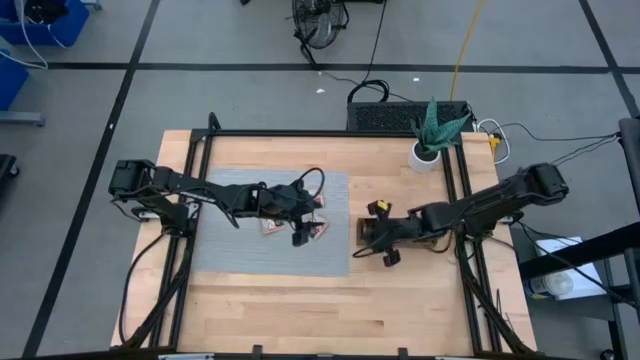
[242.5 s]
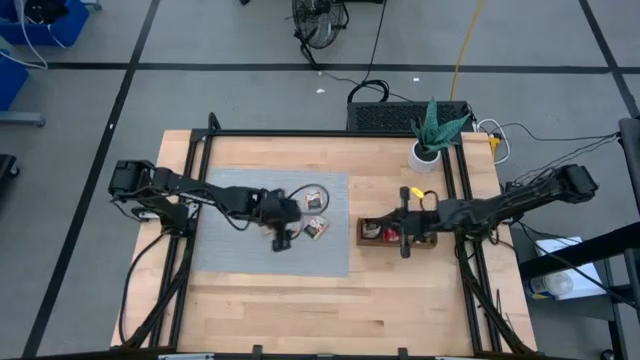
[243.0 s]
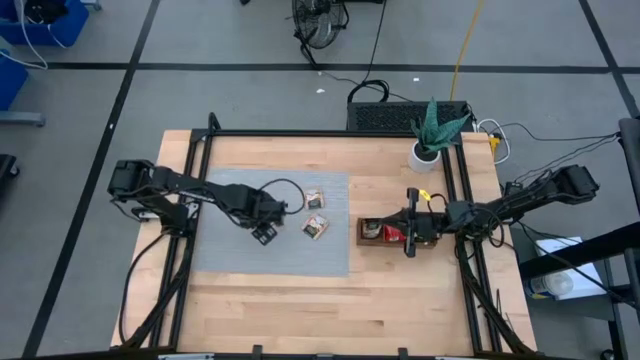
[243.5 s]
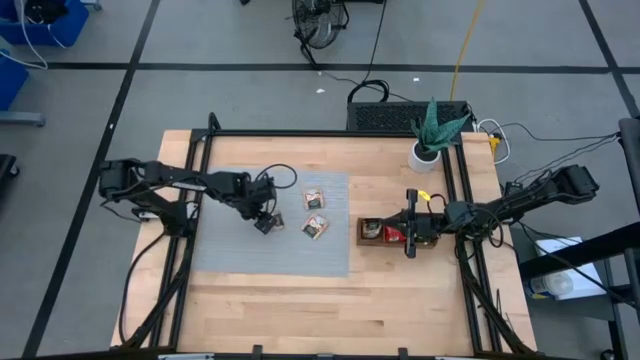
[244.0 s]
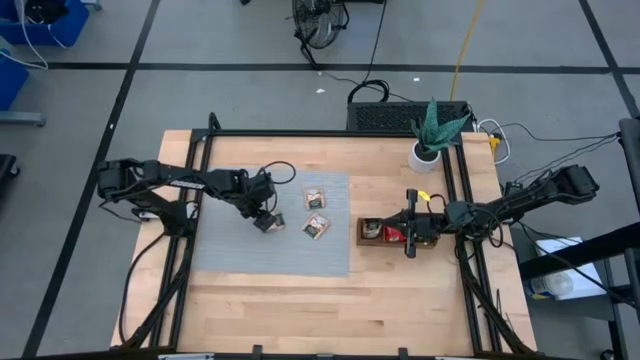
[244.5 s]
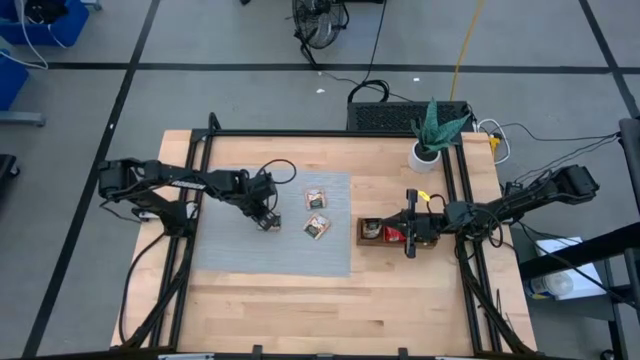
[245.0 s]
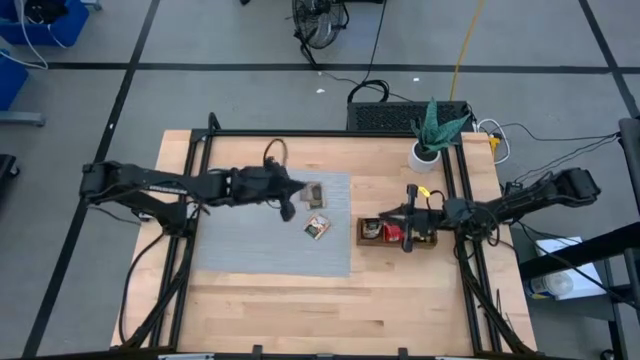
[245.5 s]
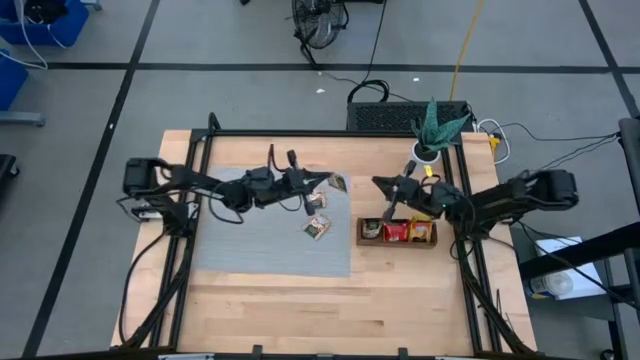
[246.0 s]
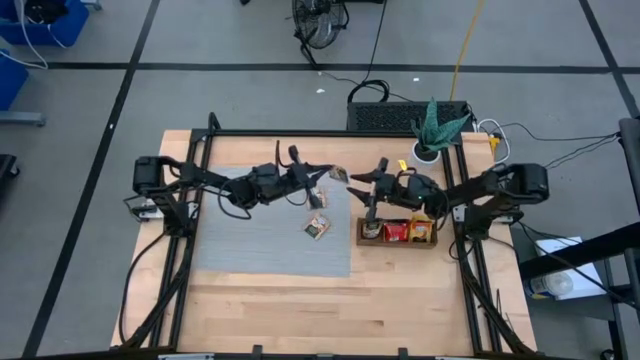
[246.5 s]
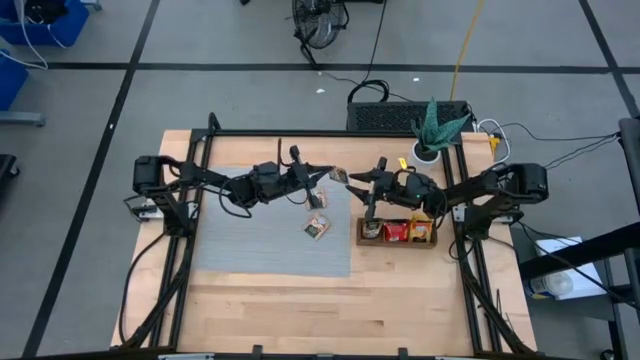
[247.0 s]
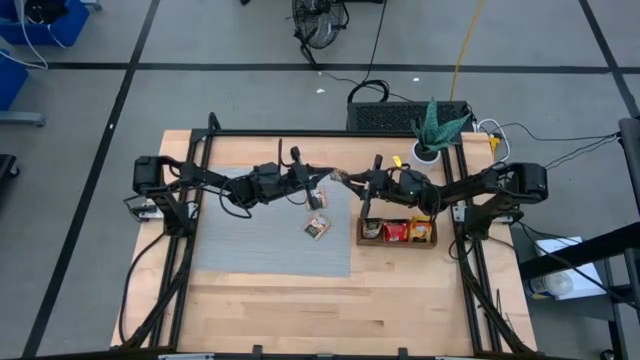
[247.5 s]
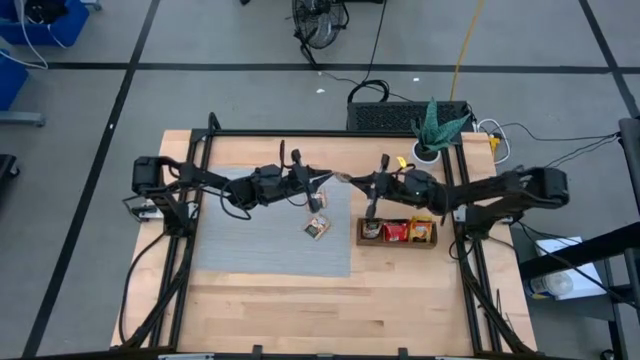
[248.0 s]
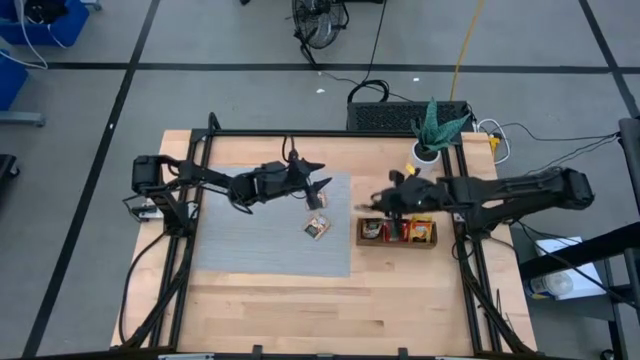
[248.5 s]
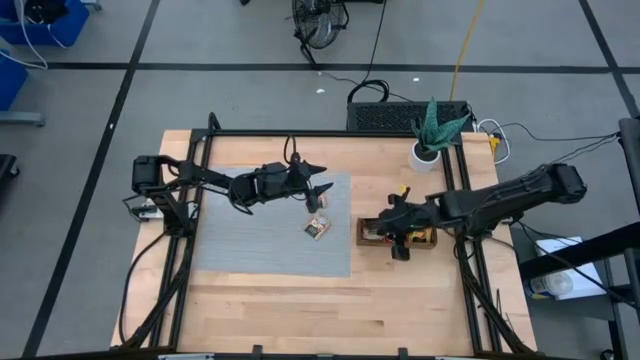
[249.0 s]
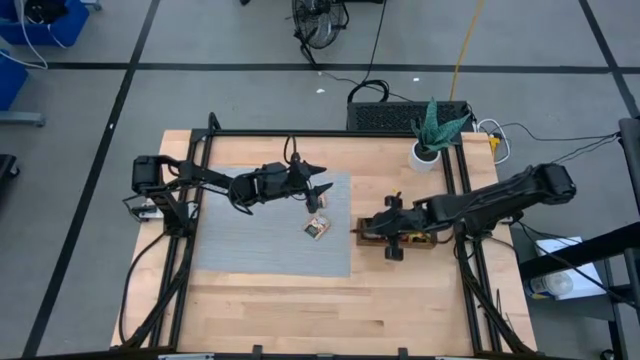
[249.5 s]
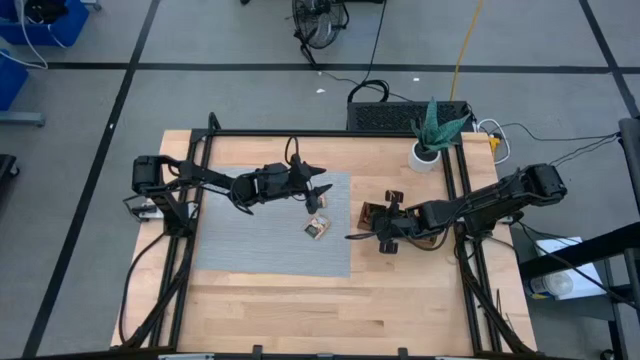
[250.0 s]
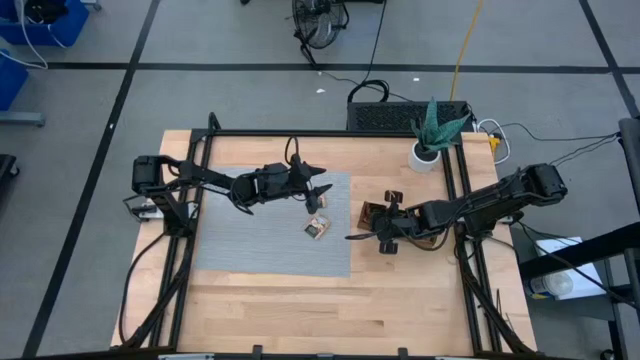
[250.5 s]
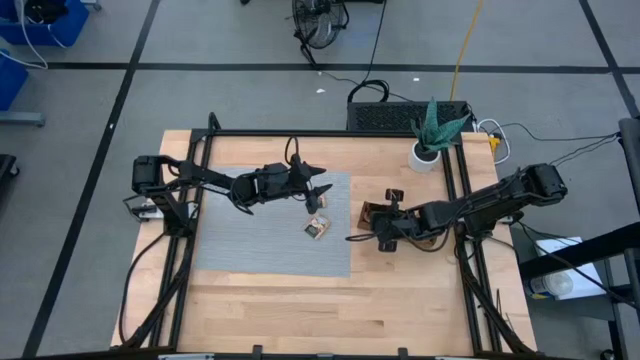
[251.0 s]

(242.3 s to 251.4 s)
Task: Pick & Place Tea
Put the brown tea bag into the left section of the wooden organizer

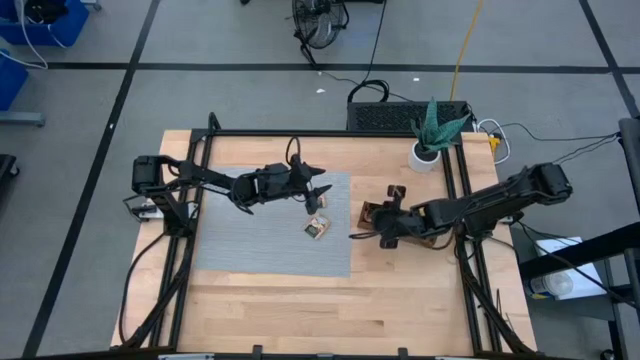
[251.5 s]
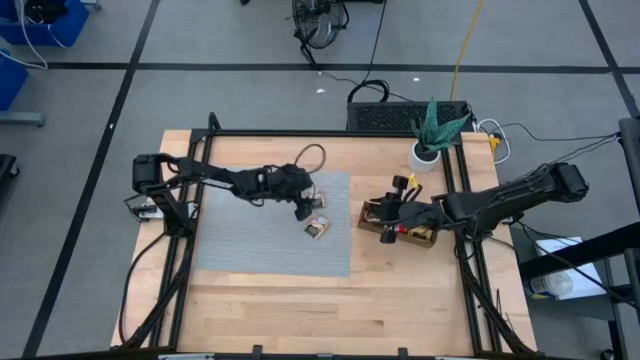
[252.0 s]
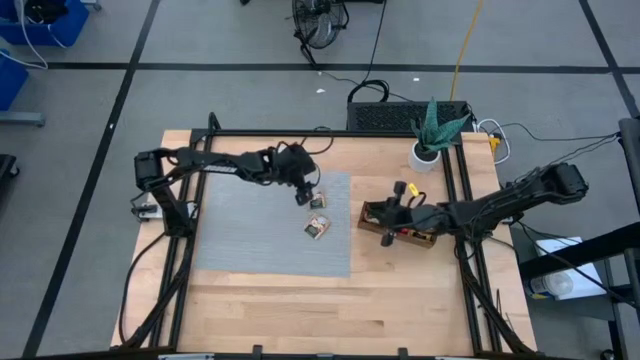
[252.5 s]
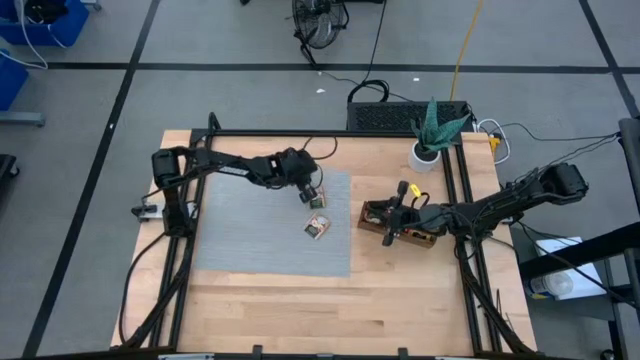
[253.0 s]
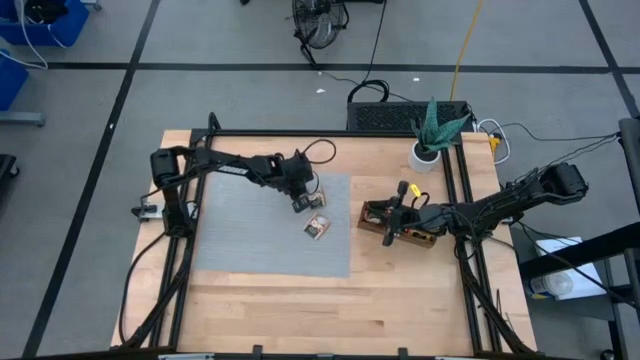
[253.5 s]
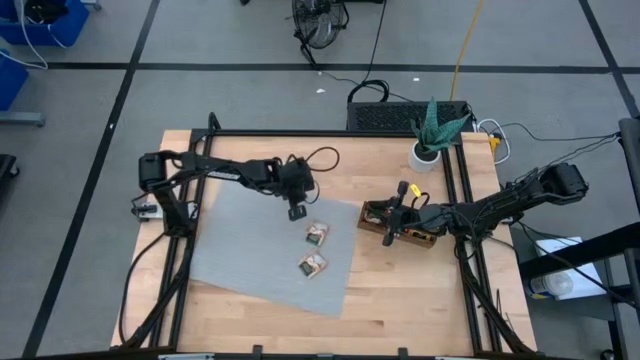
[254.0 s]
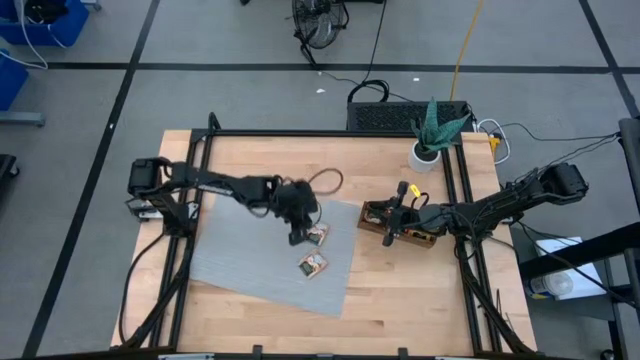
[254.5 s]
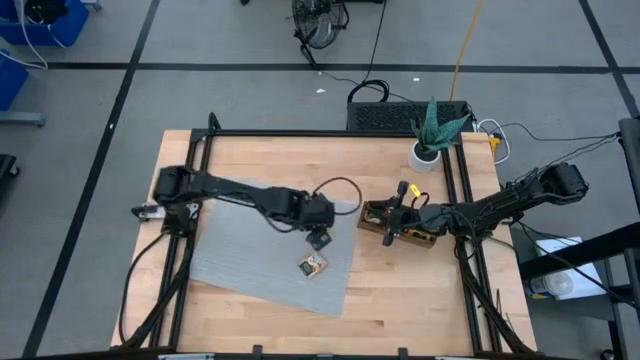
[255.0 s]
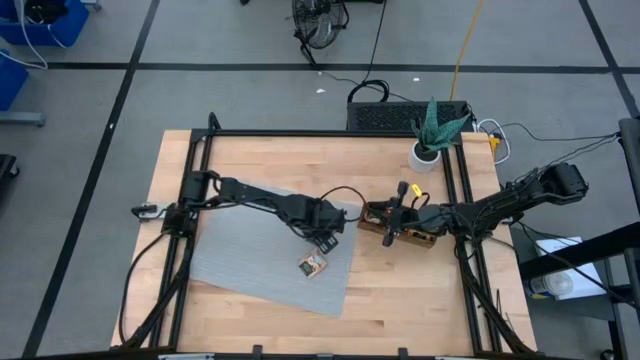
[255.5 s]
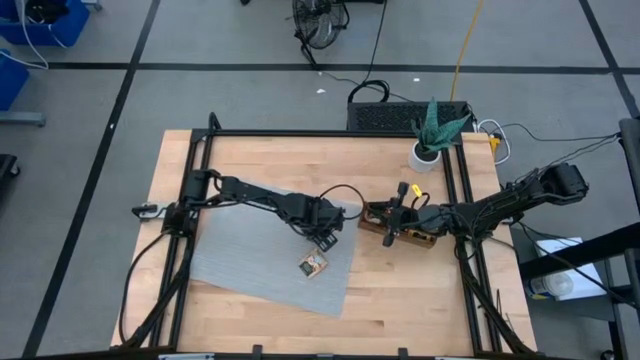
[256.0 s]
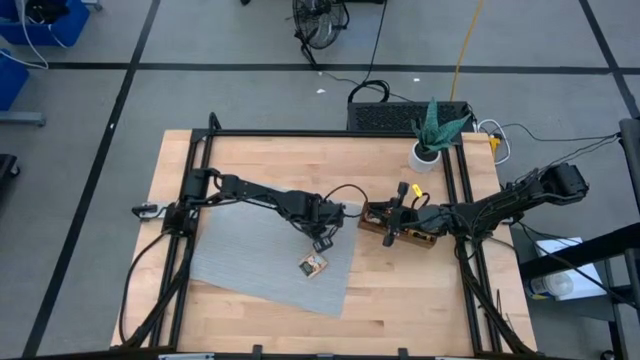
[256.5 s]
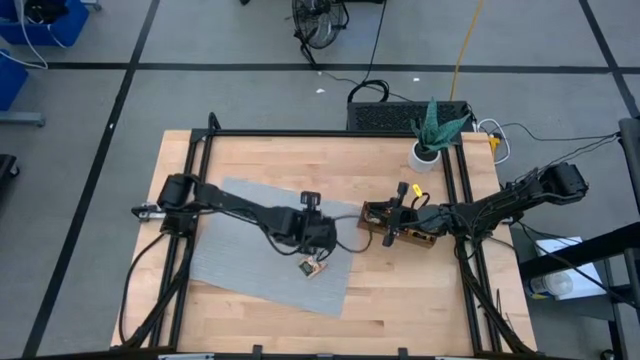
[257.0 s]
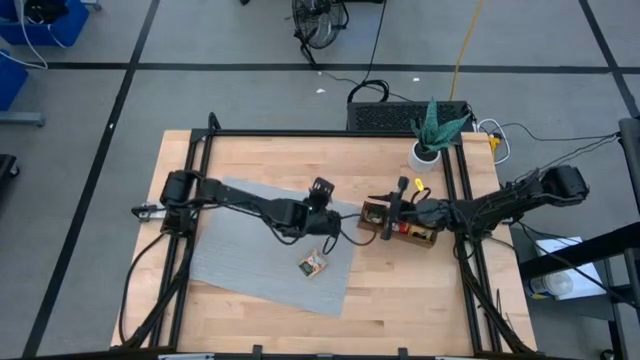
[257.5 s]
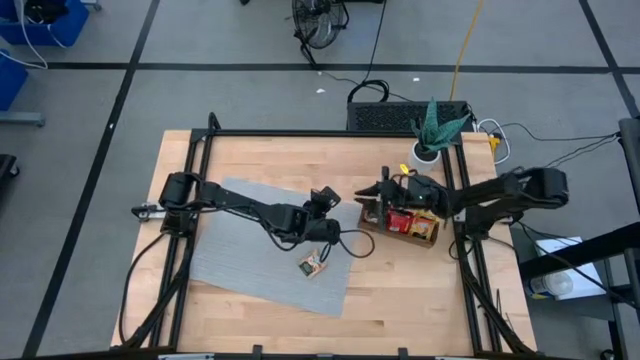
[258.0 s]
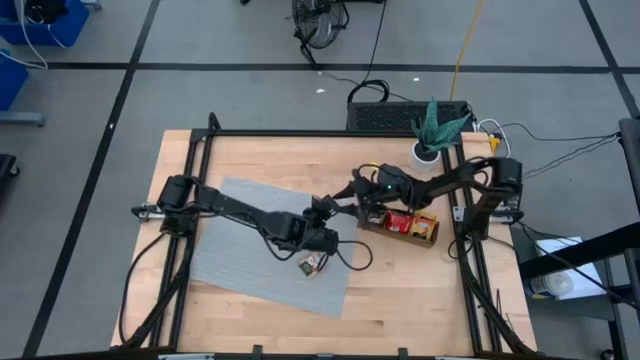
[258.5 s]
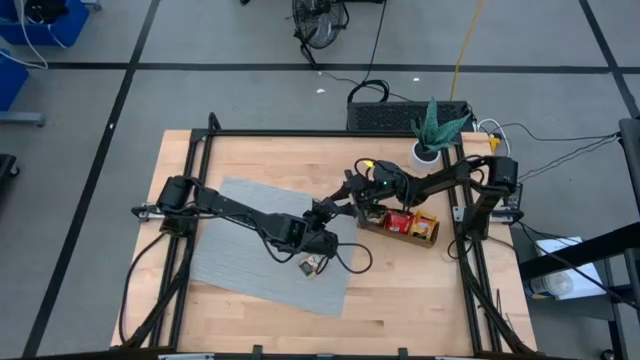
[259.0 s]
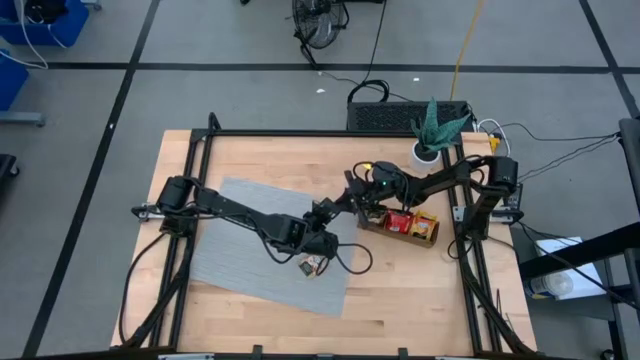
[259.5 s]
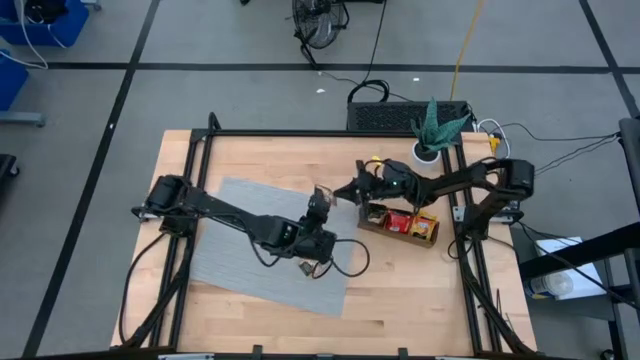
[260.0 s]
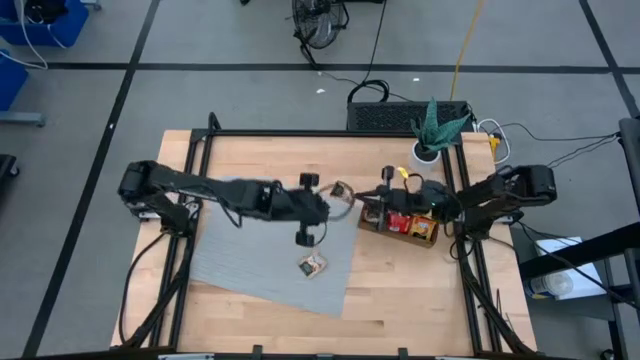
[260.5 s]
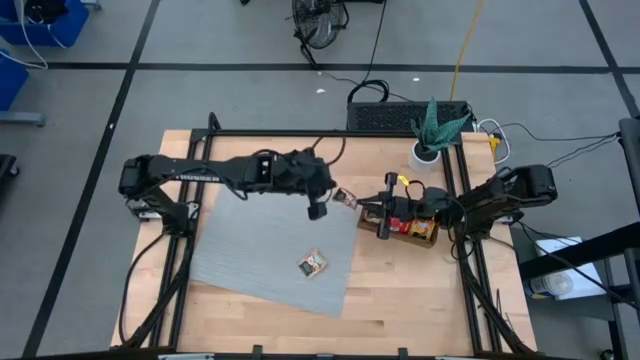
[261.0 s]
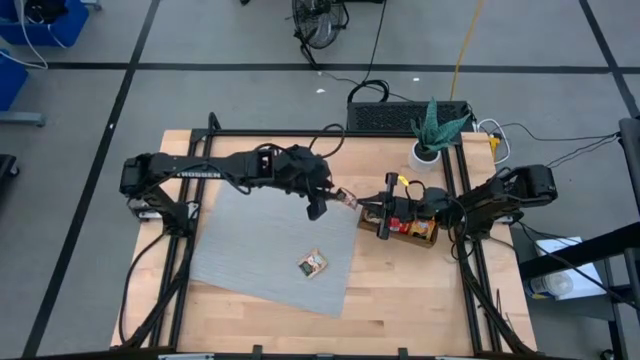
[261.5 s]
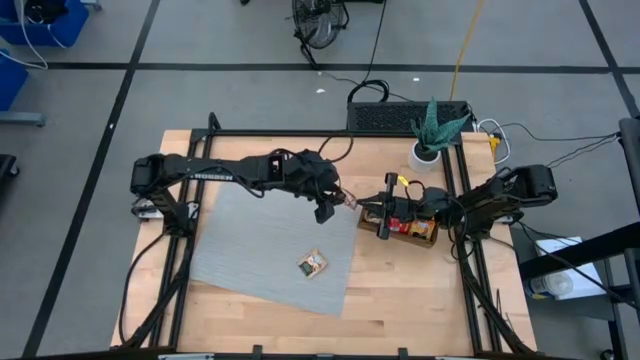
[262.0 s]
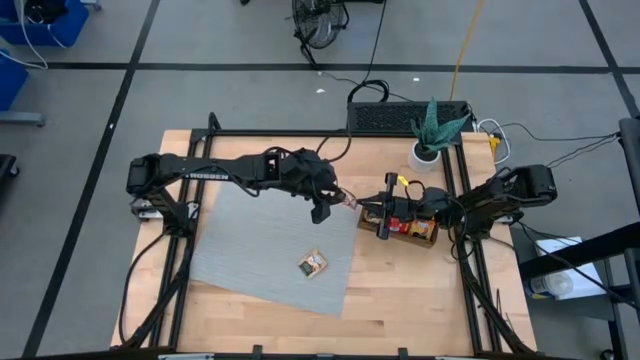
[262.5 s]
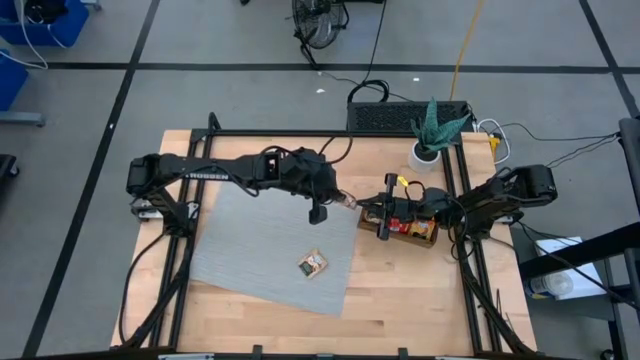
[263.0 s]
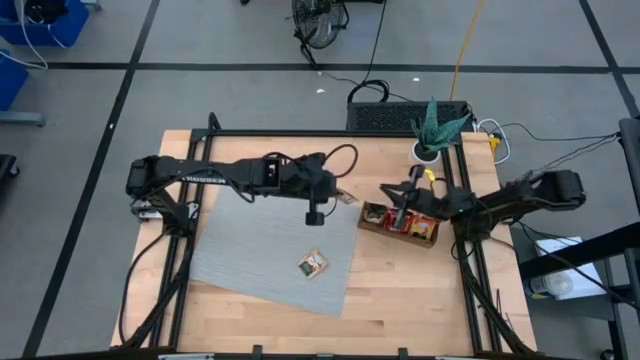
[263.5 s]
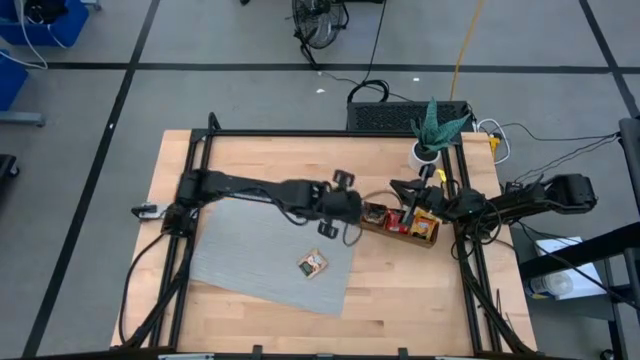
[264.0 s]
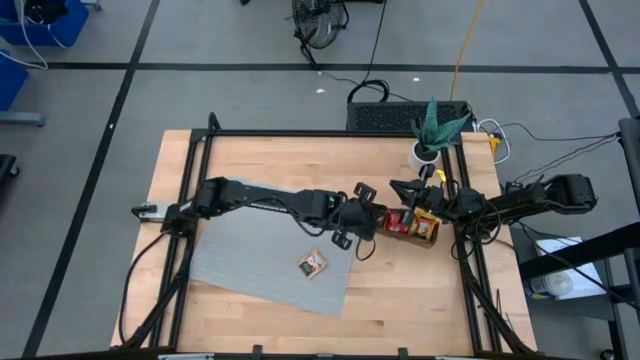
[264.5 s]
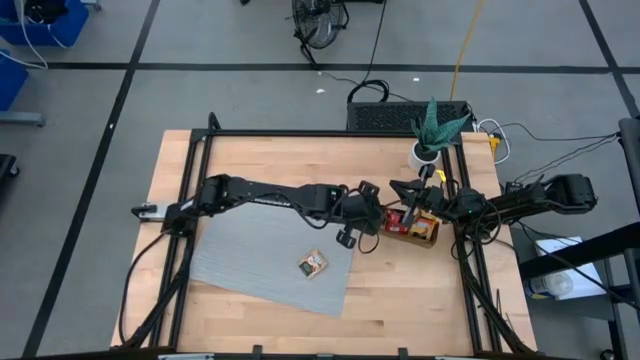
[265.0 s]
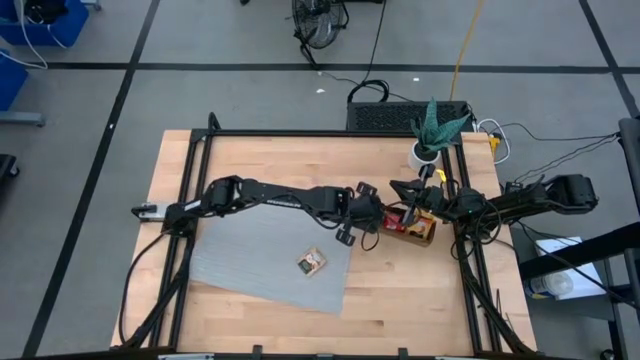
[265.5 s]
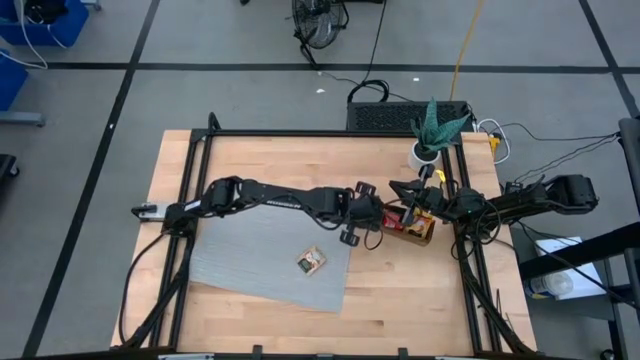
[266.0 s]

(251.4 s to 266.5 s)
Put the brown tea bag into the left section of the wooden organizer
